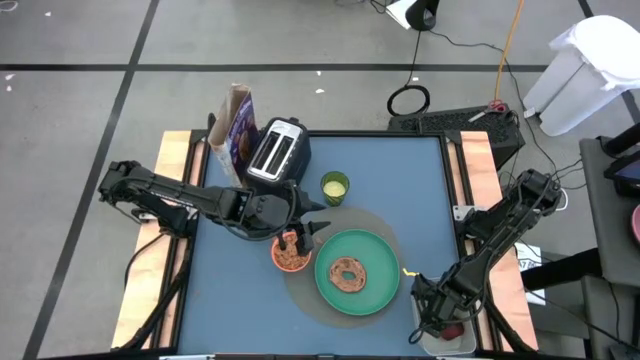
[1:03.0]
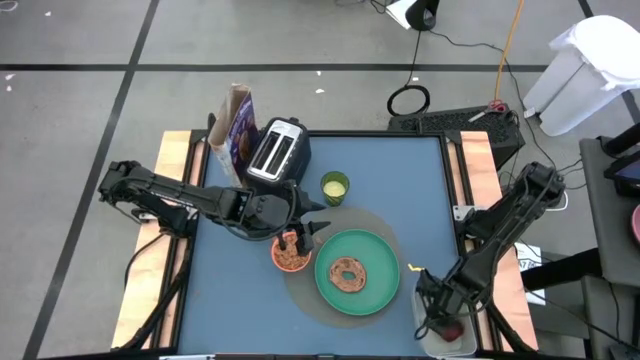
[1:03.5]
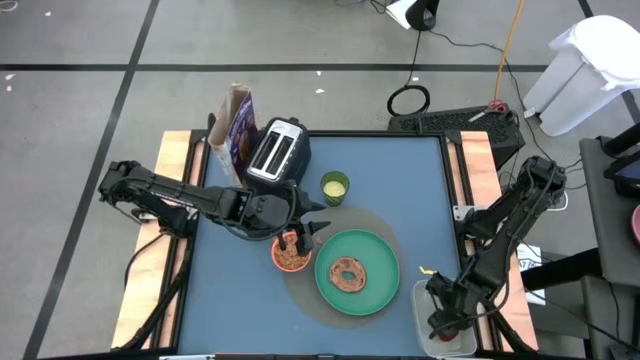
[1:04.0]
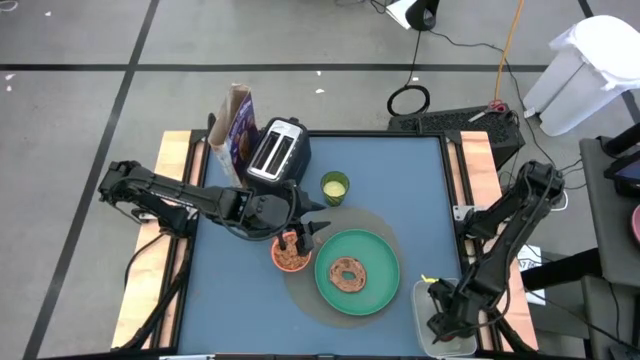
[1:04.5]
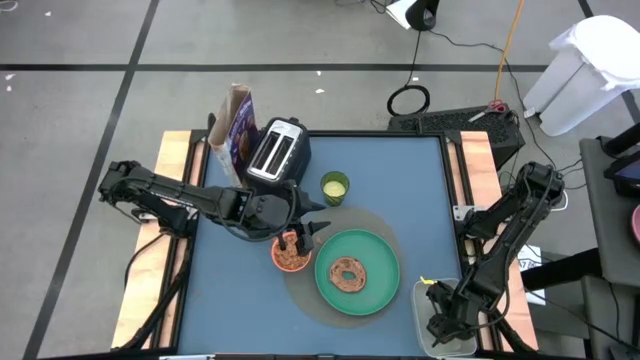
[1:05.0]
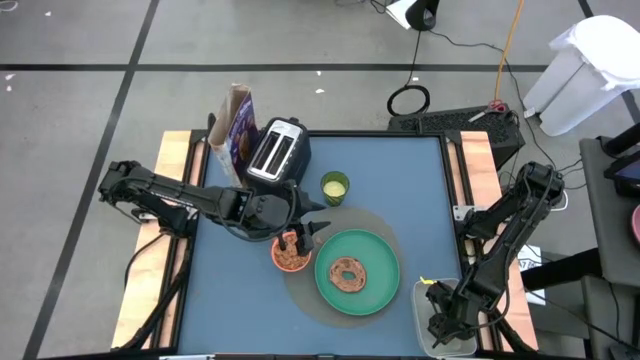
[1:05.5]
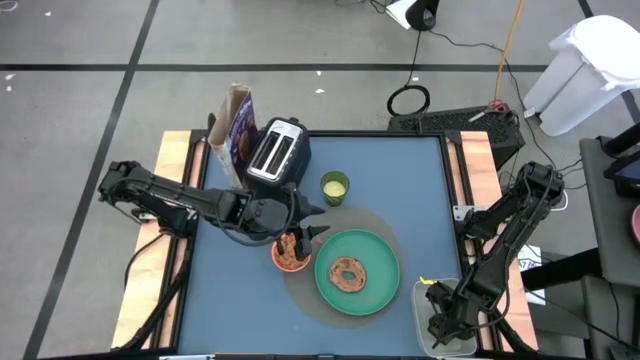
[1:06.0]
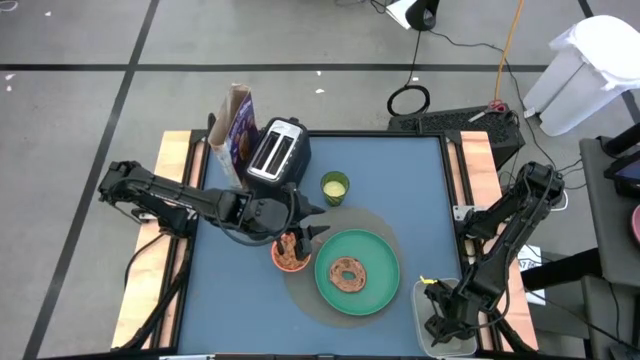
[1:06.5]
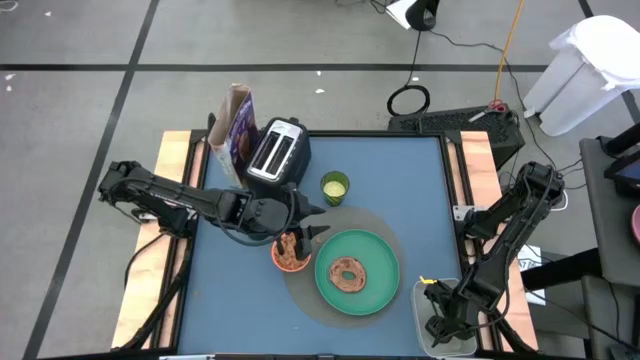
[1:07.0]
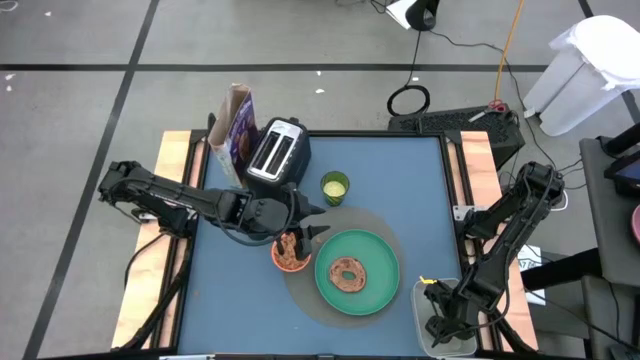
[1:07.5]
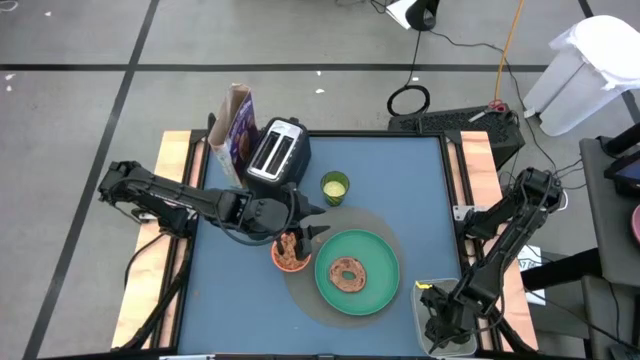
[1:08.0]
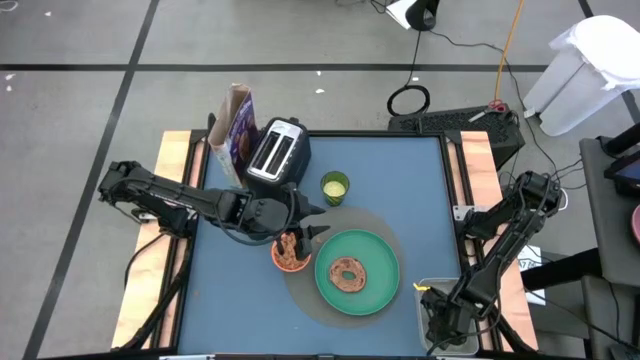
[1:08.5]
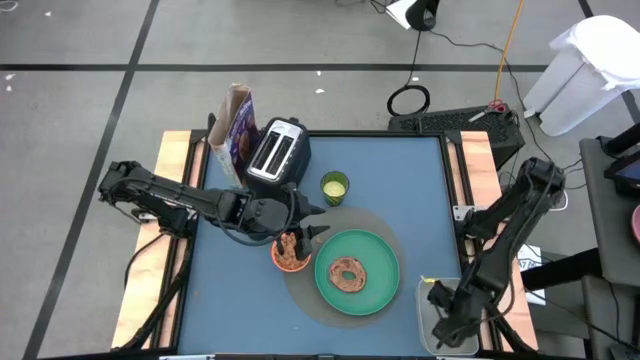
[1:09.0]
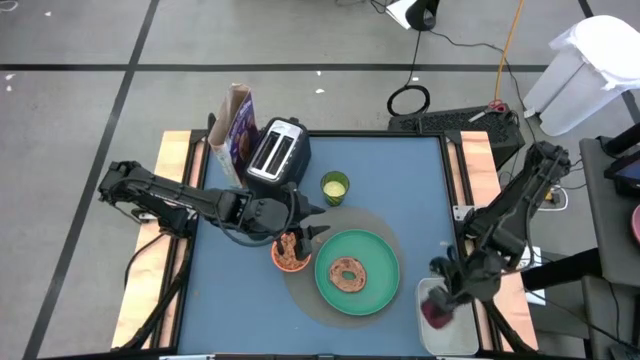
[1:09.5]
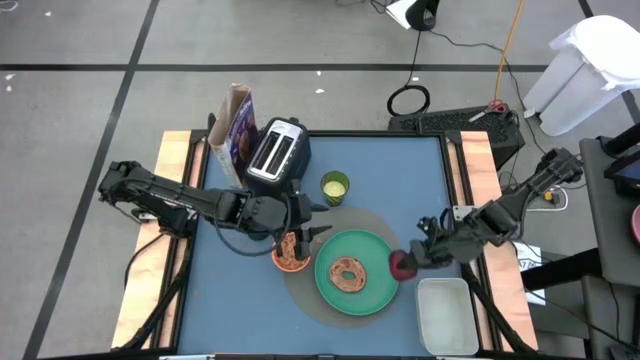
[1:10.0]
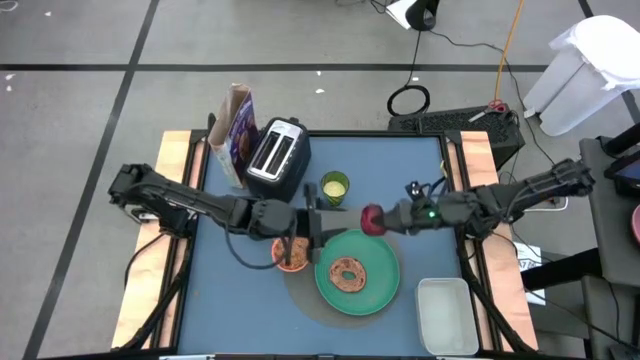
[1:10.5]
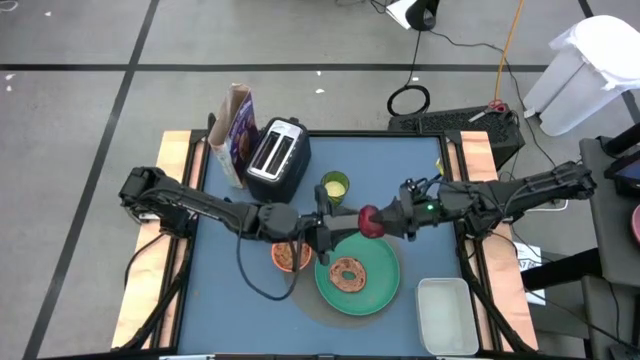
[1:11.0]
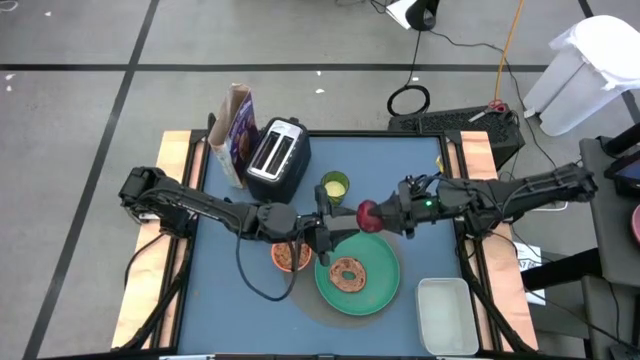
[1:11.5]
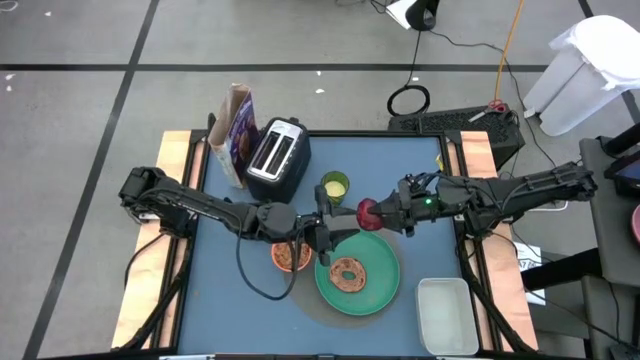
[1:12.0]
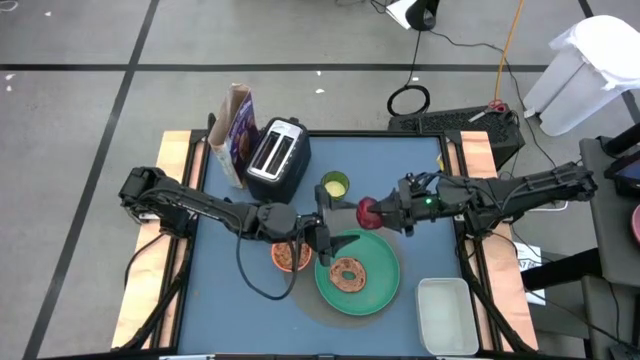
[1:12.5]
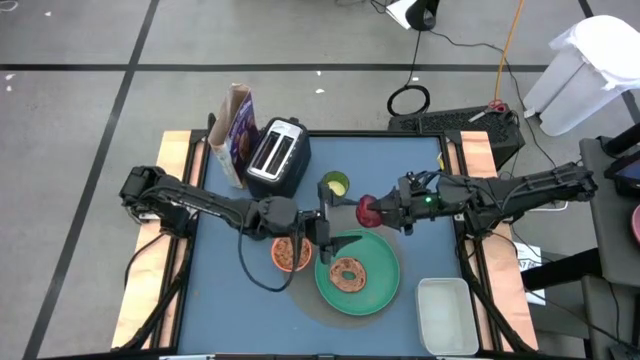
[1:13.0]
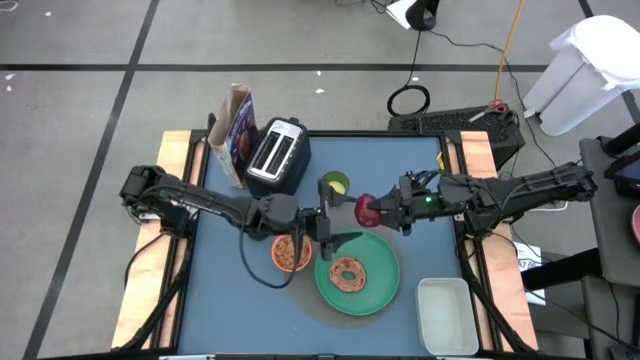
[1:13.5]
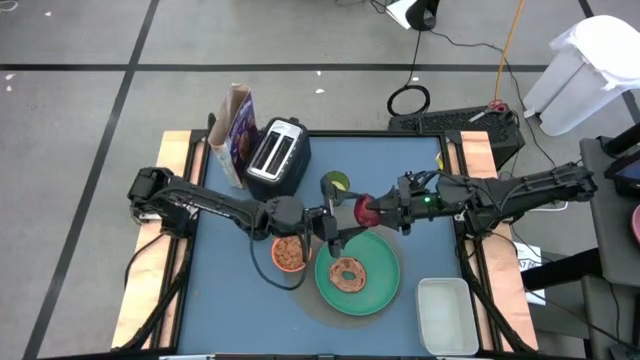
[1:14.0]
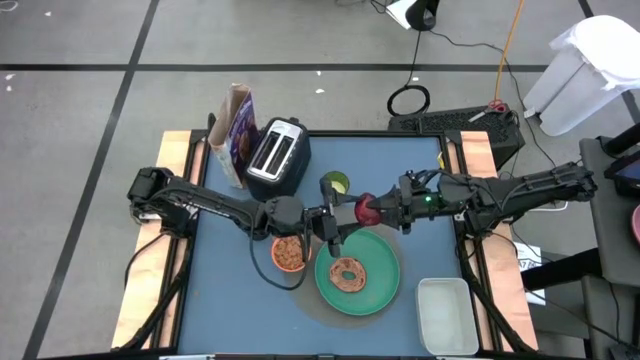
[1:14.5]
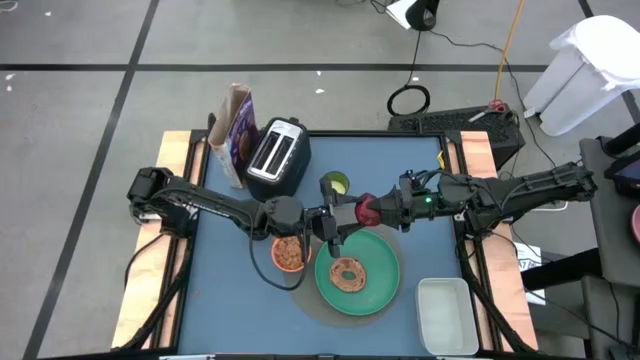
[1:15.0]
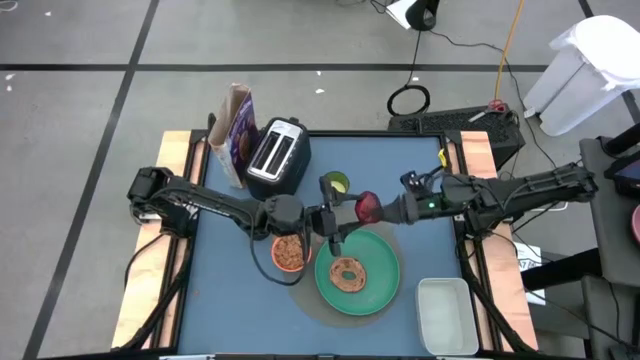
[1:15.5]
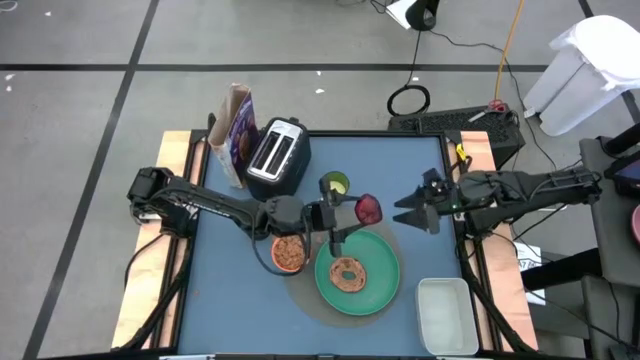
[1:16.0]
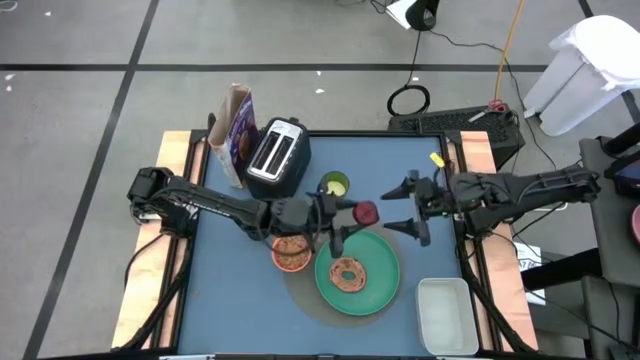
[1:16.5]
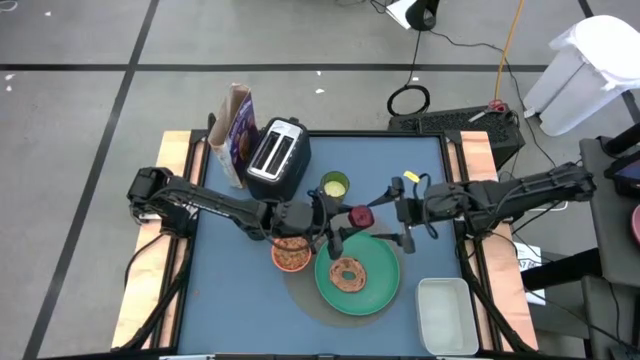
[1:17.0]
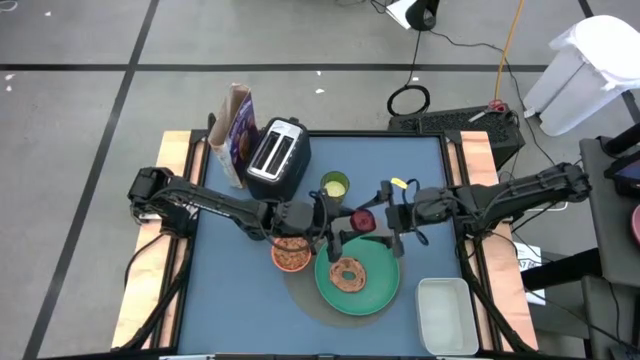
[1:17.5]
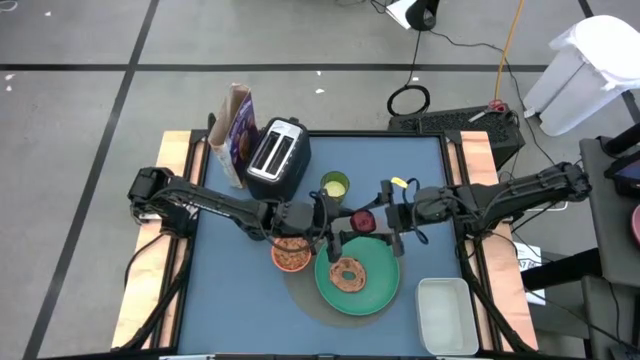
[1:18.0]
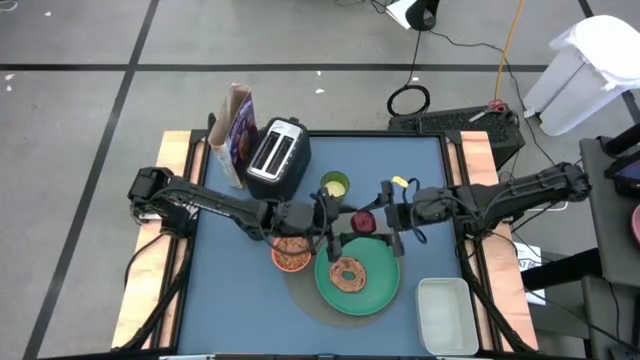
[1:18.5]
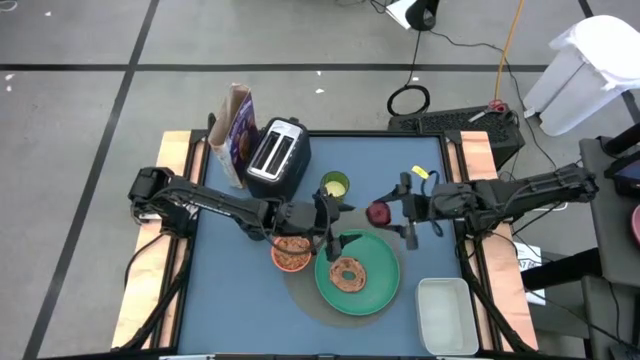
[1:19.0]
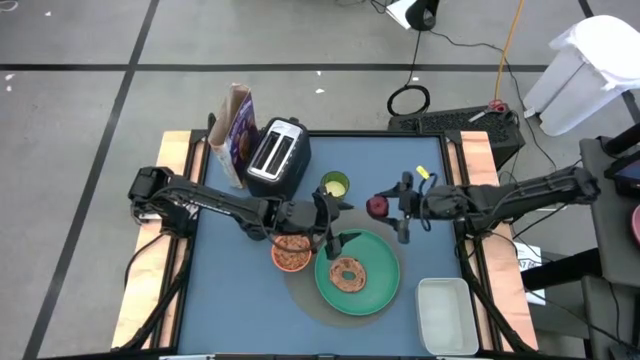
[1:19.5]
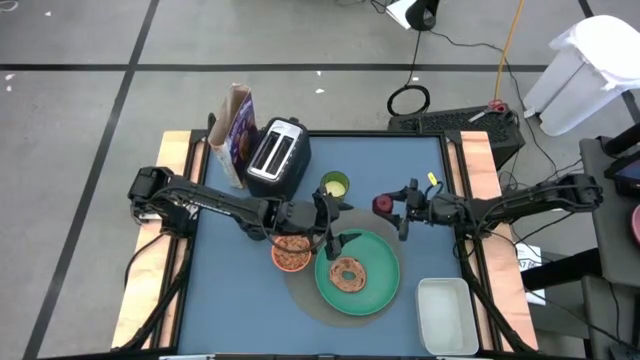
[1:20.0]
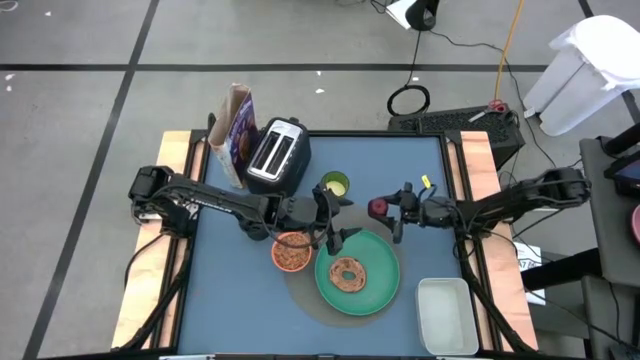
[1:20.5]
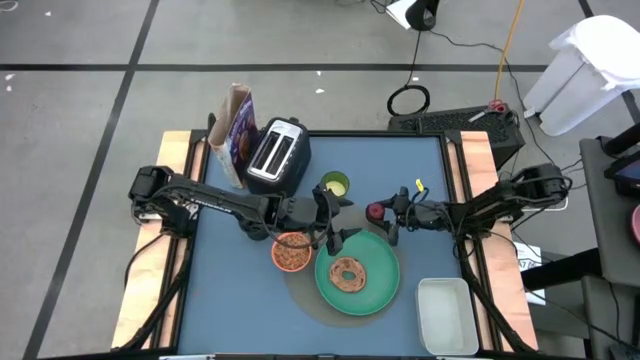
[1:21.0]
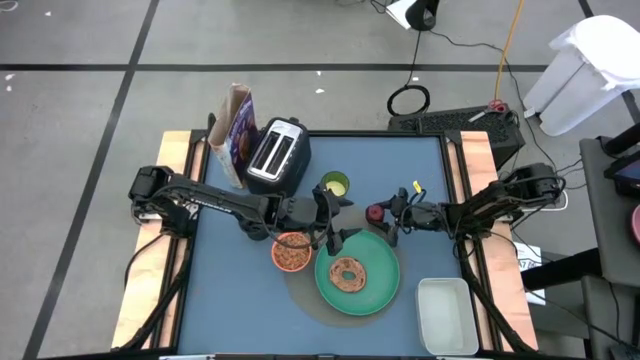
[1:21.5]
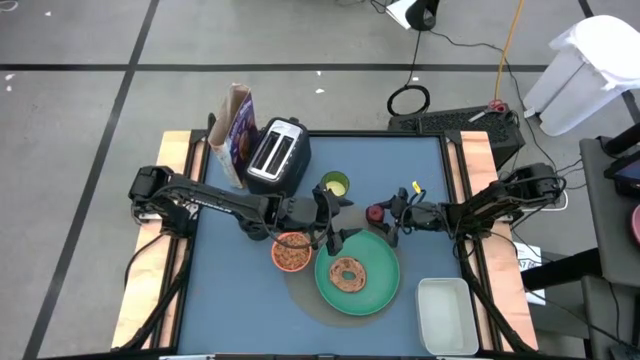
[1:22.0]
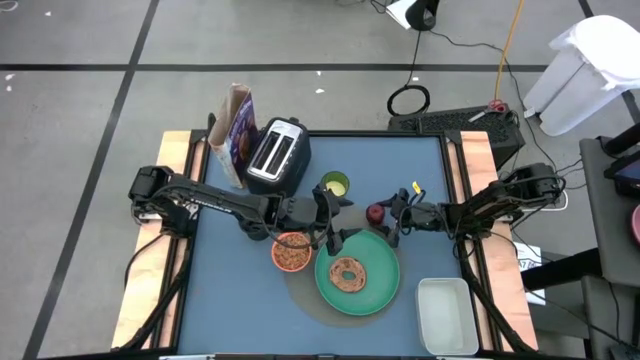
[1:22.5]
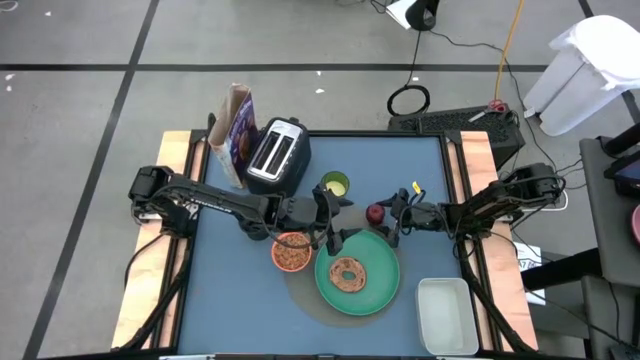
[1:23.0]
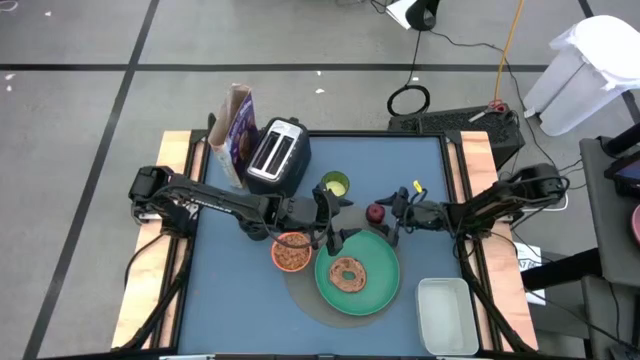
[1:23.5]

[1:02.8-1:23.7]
Task: Arrange a breakfast setting
Put the apple on the gray table mat
